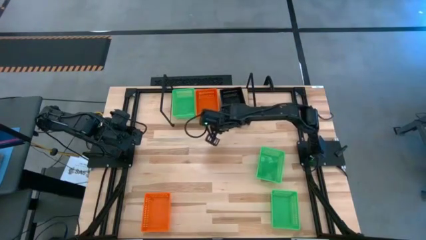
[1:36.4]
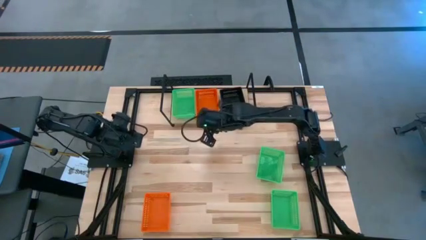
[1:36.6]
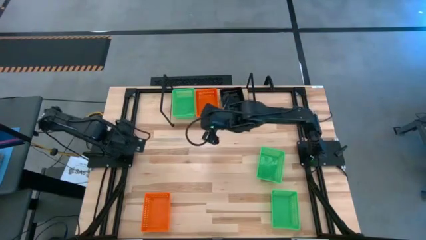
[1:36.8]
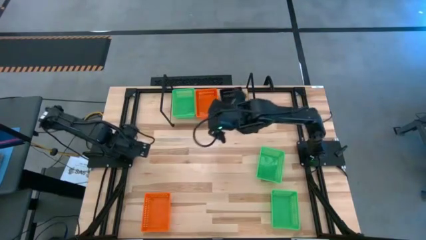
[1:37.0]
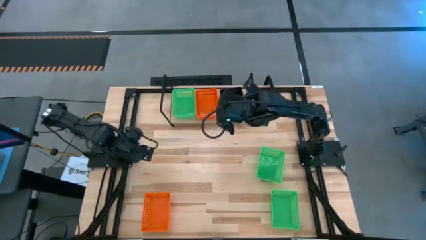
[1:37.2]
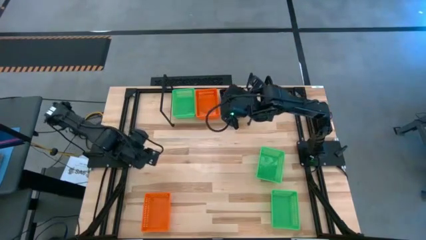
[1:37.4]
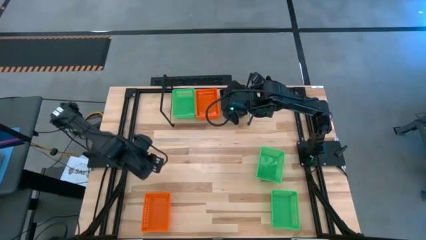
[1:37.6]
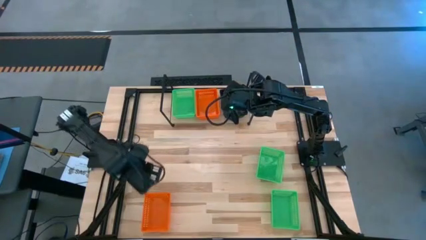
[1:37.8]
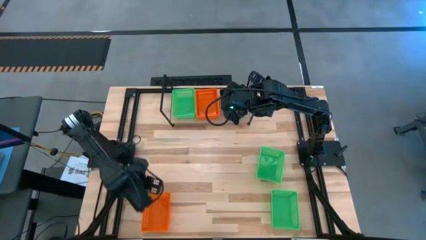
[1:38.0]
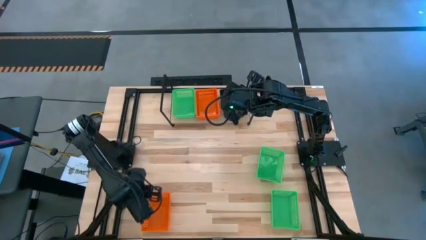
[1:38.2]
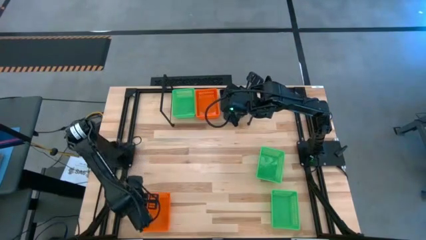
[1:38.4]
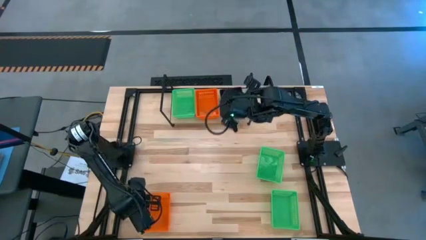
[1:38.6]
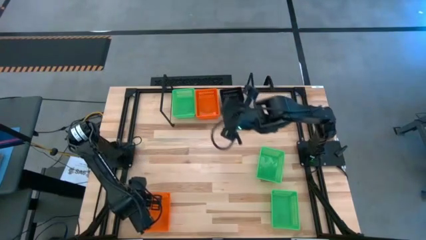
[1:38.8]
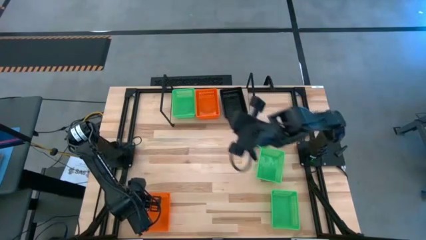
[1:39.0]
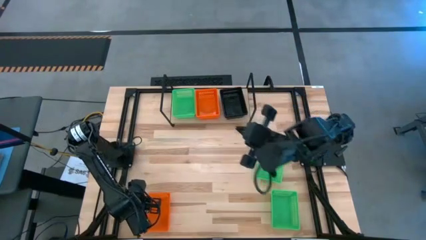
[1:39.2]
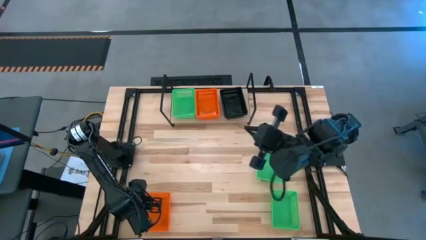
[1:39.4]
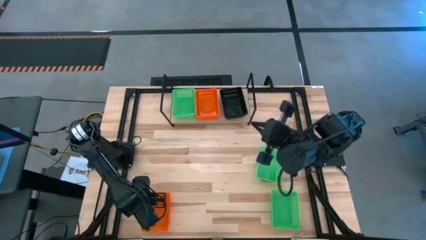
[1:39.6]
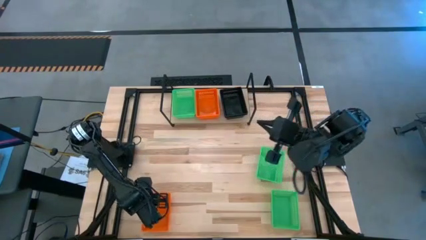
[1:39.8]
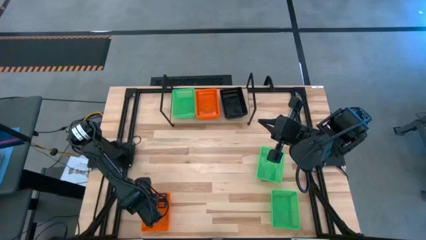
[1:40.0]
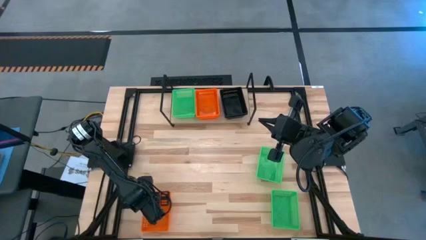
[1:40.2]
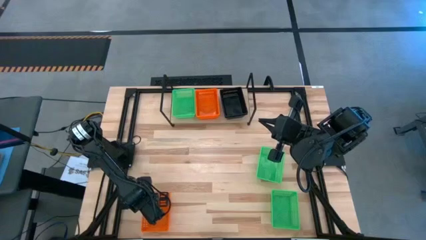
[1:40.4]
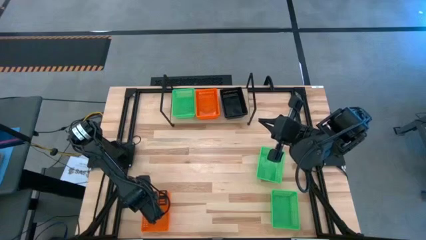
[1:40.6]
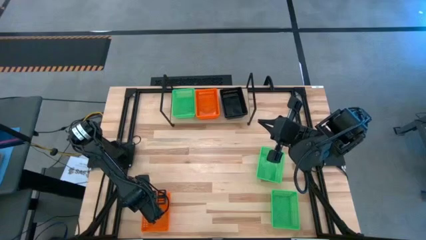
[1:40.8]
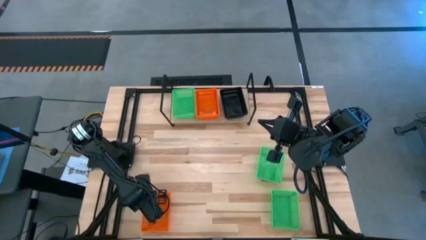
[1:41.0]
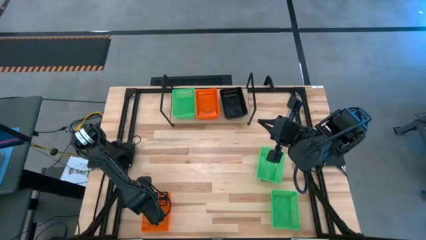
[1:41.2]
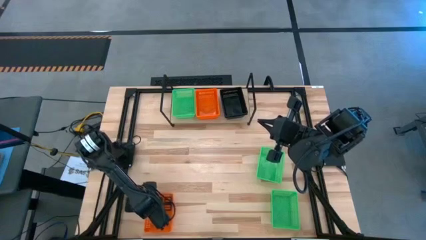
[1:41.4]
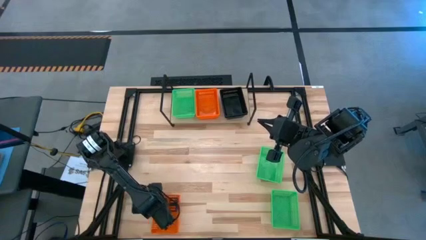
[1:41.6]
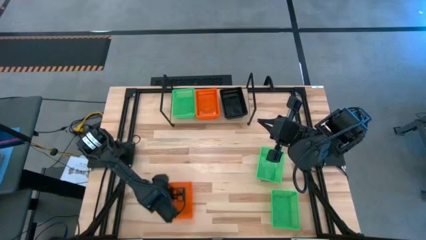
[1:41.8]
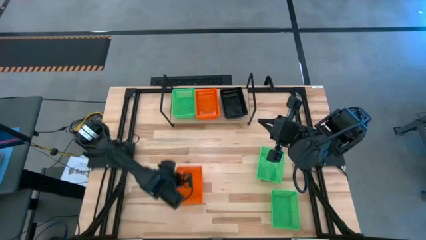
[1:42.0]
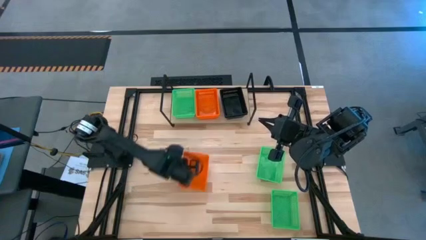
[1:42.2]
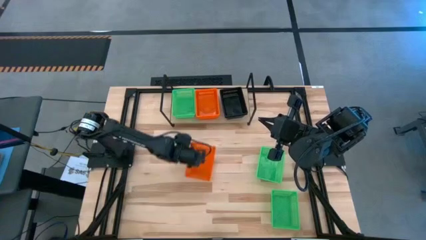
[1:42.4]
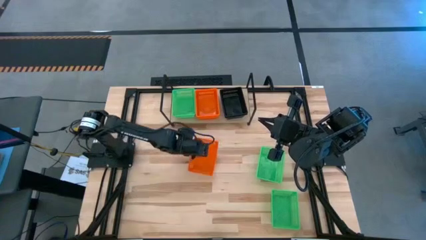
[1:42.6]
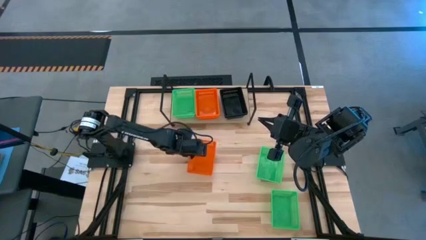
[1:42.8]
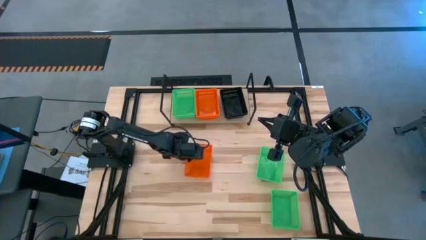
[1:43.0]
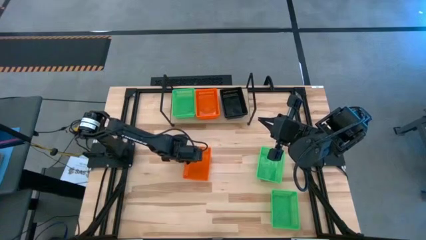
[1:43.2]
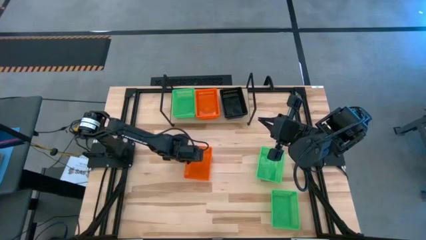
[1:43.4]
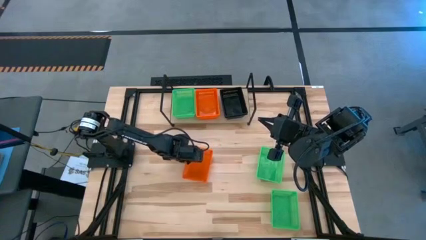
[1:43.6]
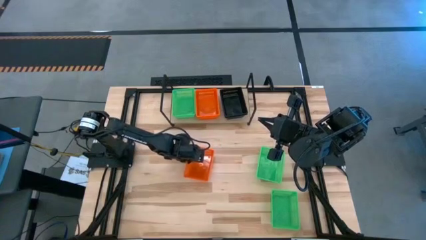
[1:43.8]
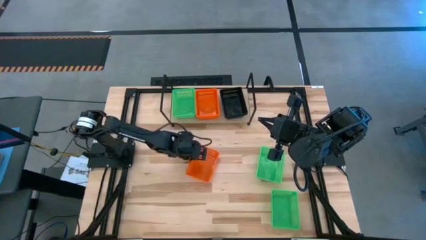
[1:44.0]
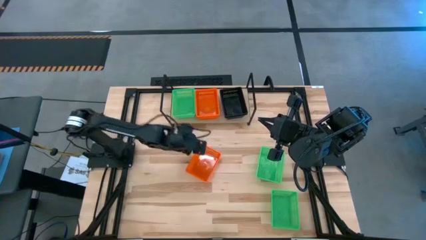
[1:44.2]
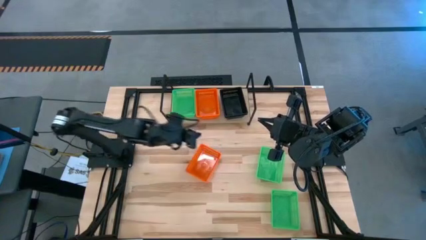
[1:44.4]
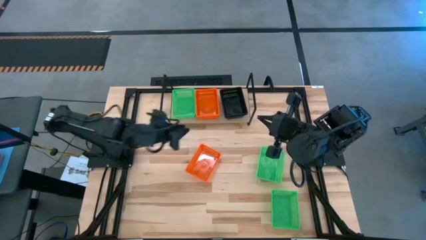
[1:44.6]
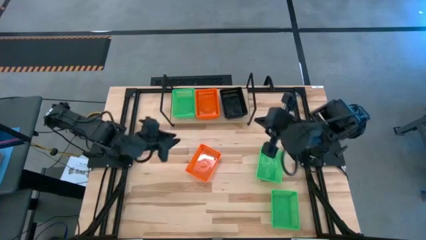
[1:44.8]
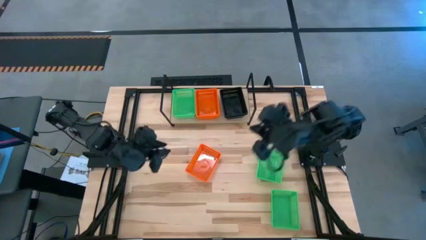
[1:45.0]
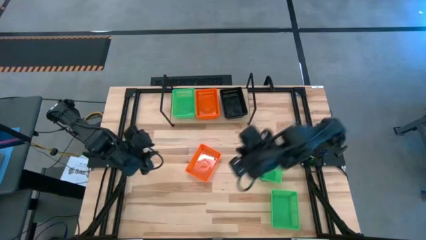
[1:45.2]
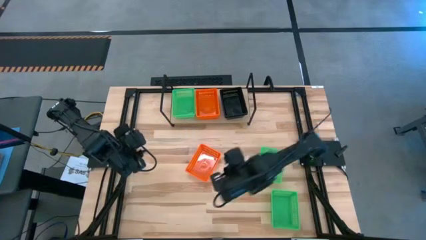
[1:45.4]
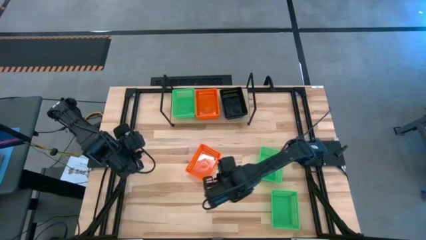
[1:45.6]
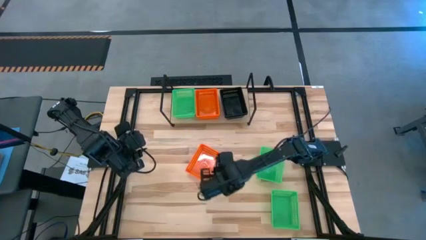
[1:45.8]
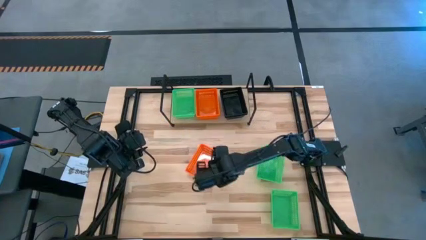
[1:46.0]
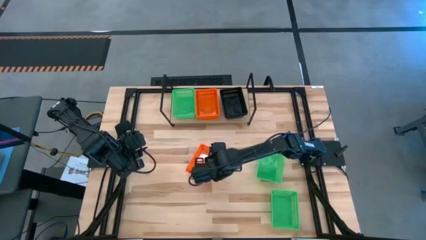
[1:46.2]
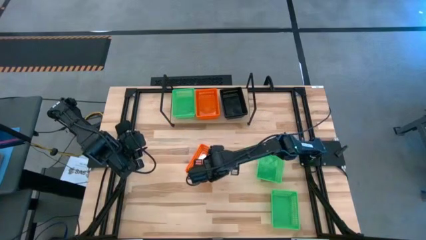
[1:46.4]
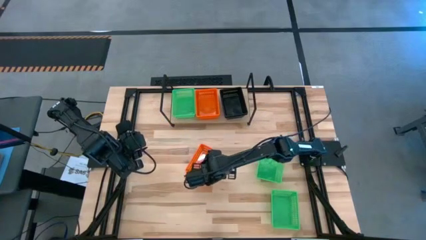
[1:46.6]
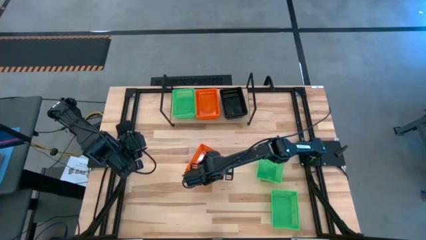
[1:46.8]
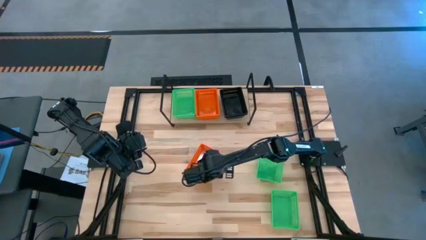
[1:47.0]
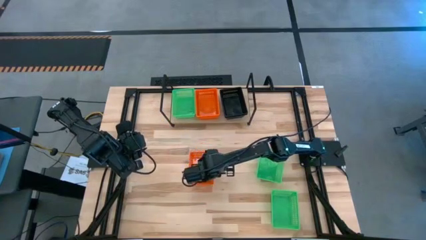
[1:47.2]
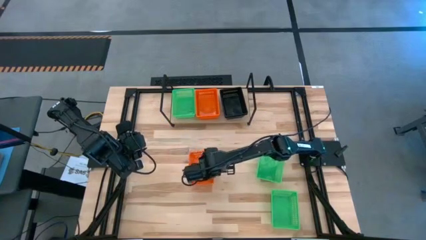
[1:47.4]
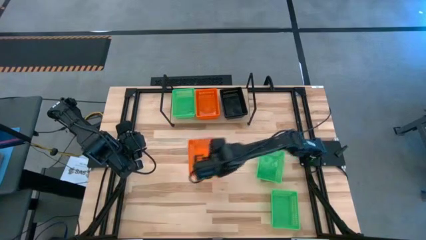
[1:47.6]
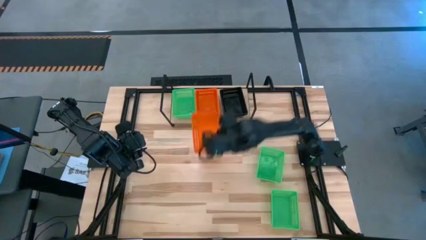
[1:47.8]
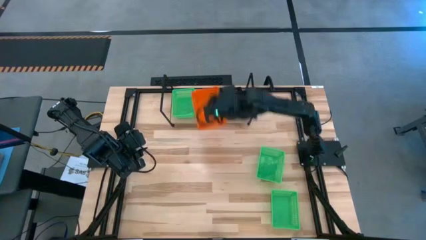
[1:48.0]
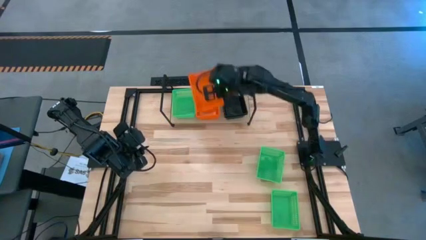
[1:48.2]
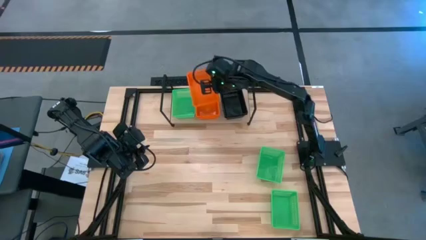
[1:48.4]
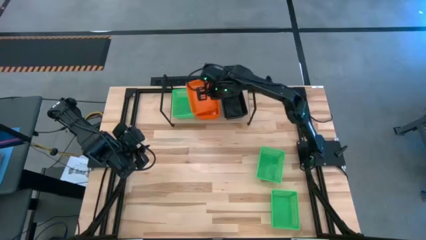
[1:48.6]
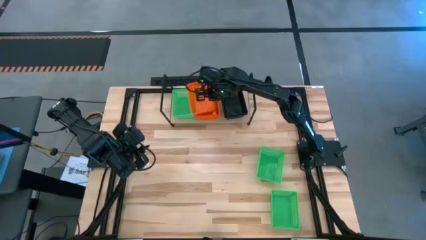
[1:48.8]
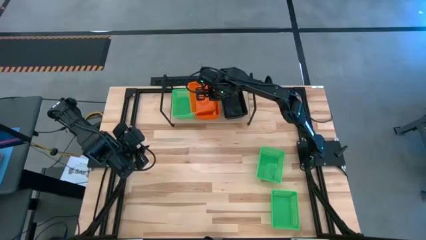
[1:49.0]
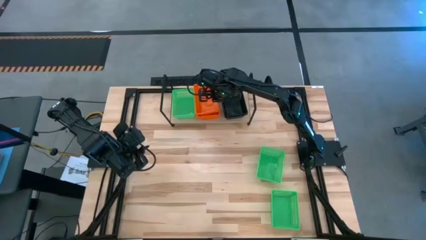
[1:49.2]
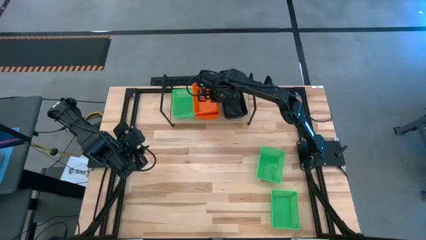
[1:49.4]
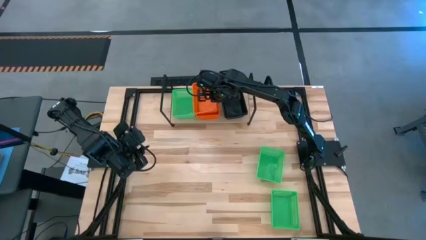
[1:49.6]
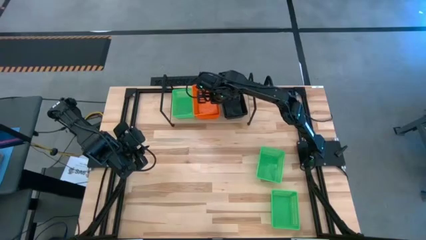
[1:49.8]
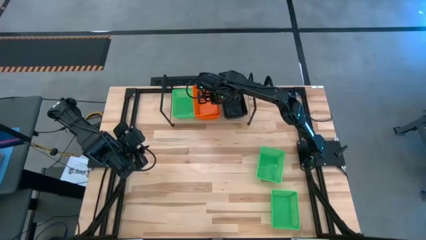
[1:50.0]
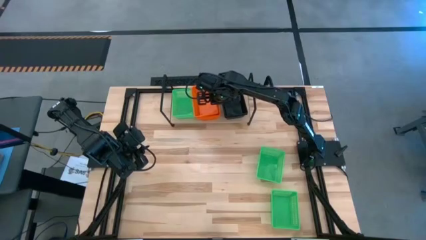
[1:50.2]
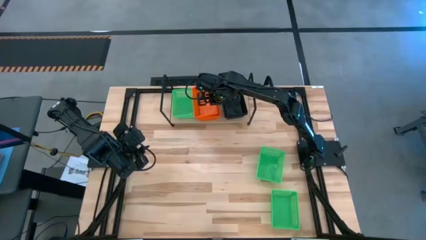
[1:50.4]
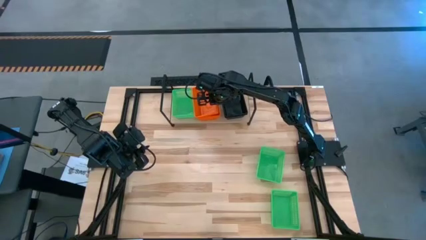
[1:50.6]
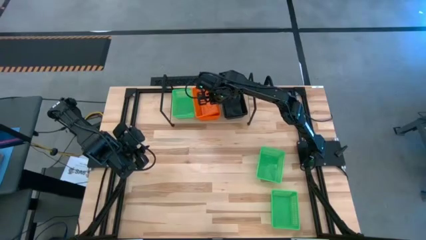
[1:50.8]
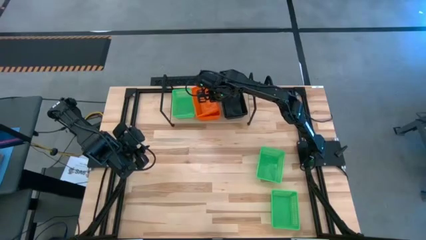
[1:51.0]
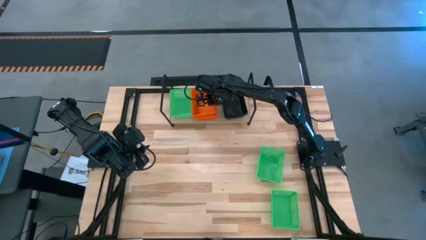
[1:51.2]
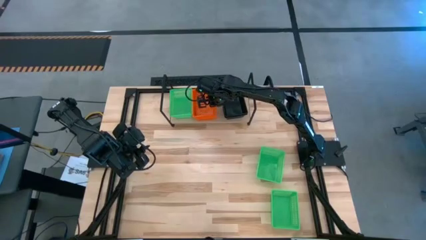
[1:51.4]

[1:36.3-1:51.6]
Task: Stack baskets on shelf by color
Stack the orange bin on top of the orange bin on the shelf
